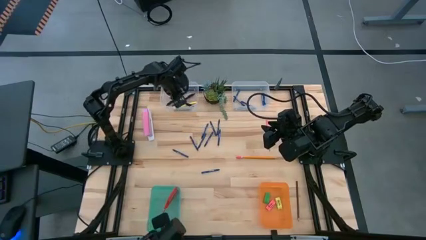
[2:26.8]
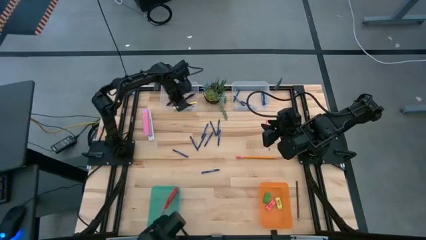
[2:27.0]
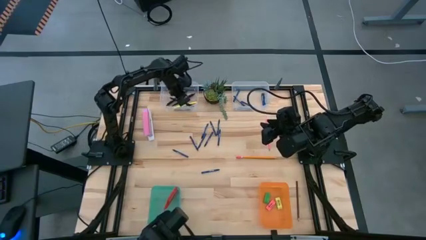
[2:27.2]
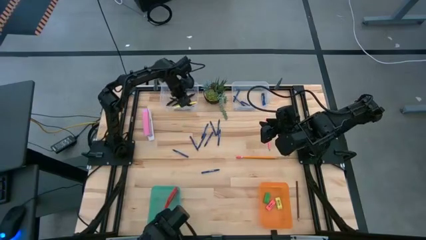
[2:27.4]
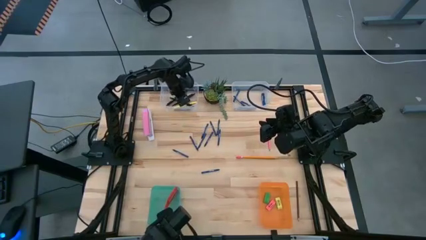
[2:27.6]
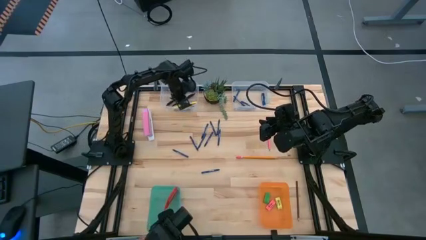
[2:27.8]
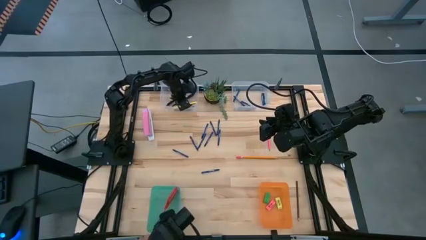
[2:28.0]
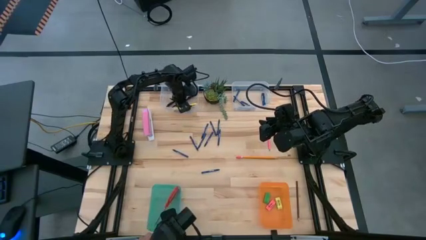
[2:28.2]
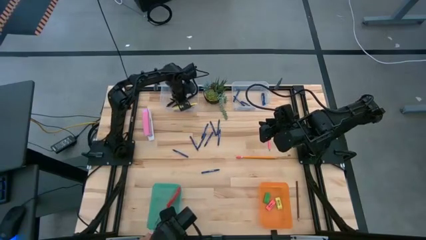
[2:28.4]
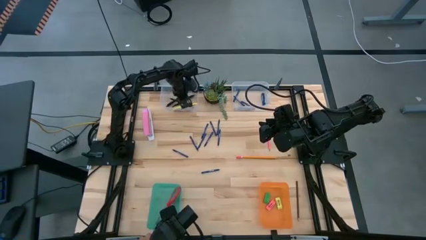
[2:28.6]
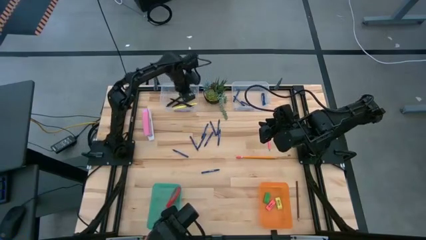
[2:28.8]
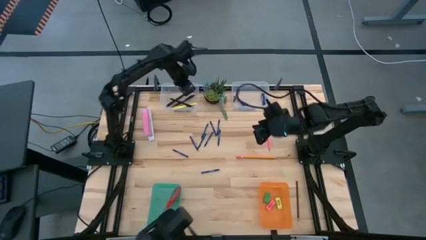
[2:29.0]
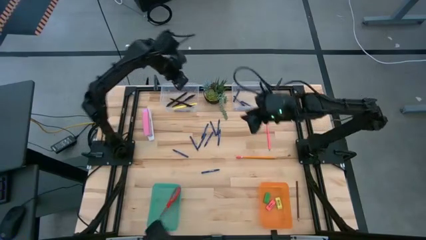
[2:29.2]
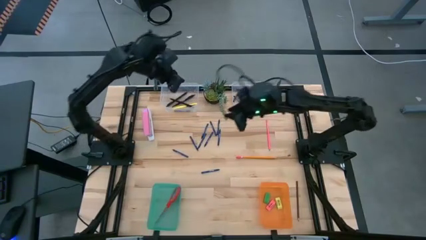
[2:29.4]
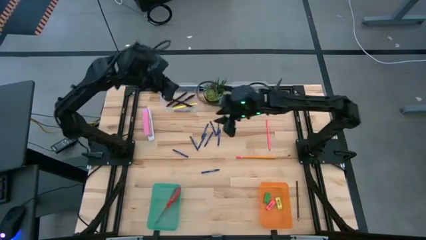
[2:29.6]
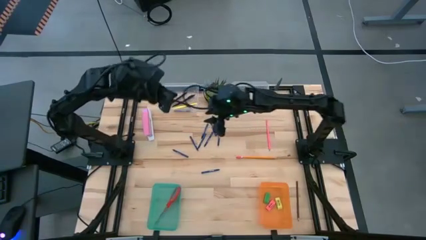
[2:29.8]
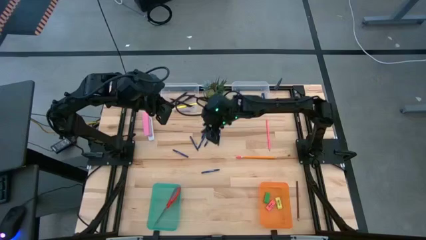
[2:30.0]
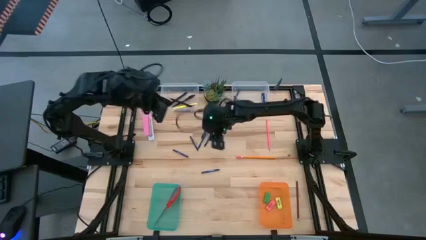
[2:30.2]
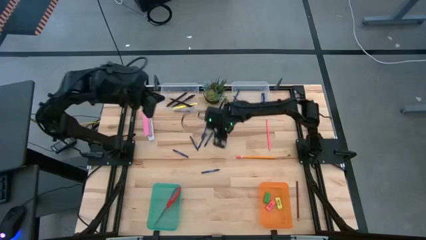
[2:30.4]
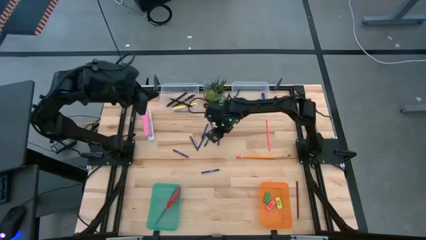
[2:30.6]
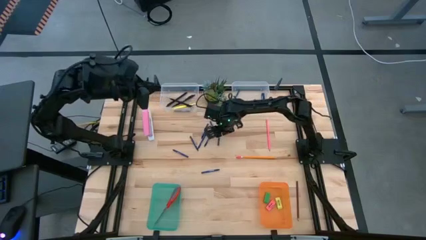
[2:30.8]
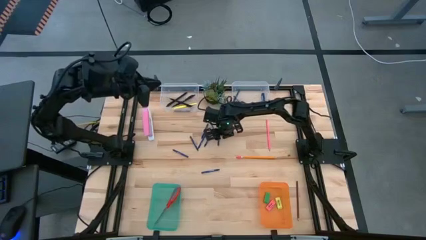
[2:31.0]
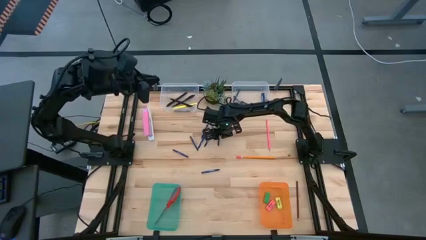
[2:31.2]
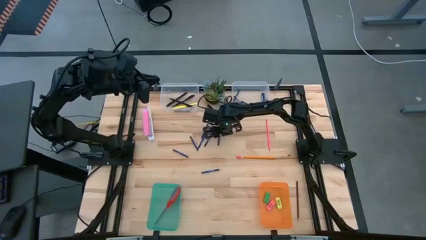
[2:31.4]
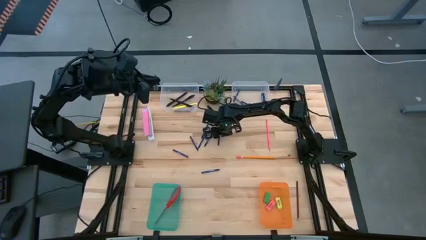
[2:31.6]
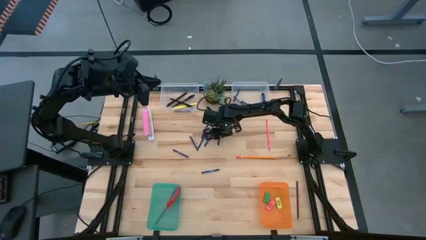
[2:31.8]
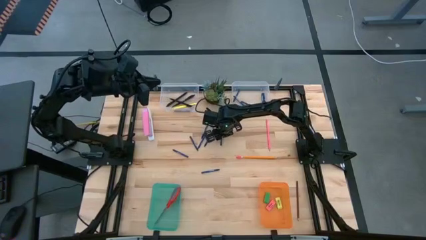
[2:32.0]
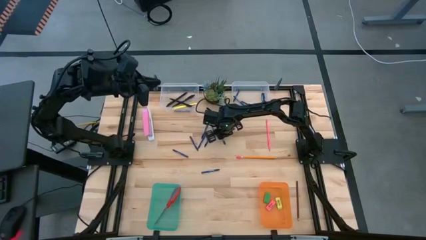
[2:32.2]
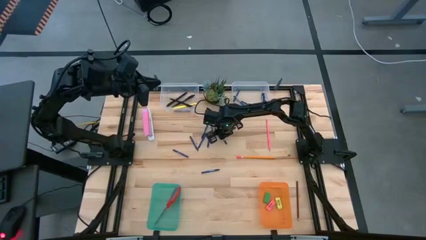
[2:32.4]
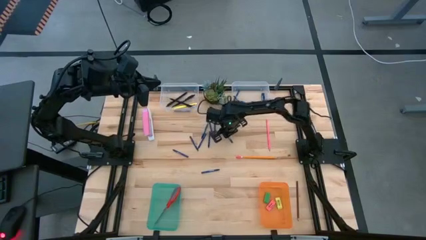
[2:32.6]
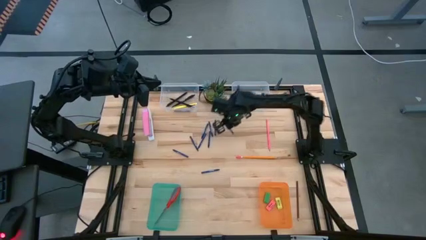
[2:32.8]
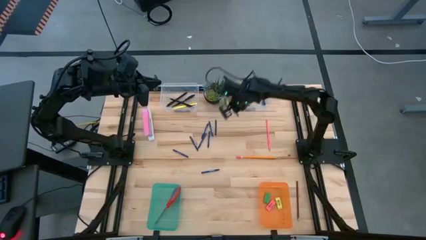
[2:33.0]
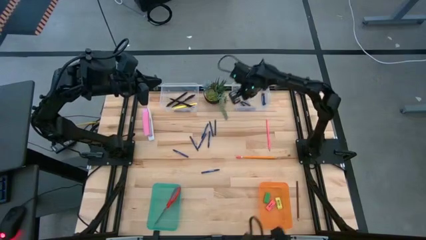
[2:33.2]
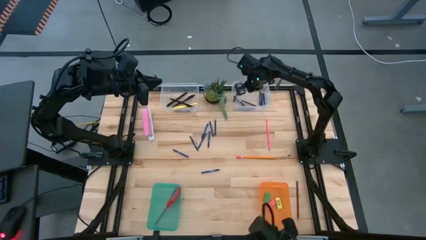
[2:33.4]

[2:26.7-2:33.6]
Task: Sort crayons/erasers/pens/pencils in bins
Put the blue crayon into the right transparent bin

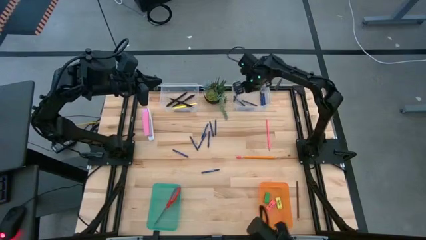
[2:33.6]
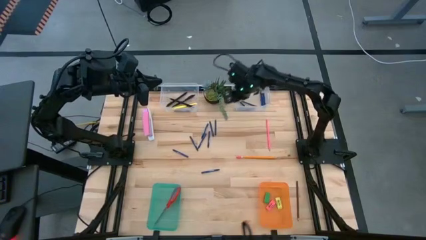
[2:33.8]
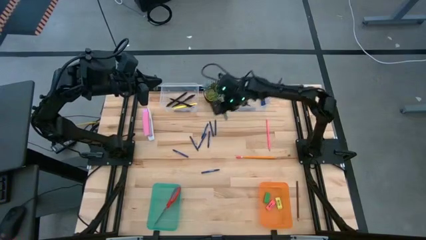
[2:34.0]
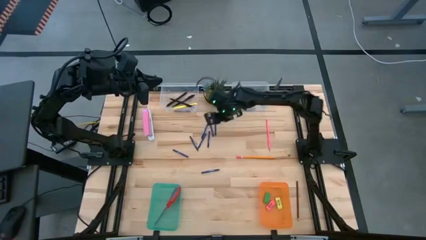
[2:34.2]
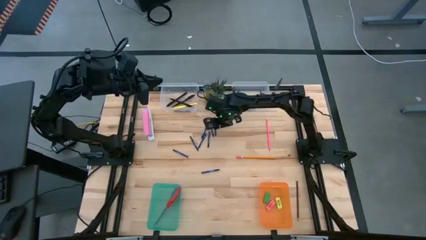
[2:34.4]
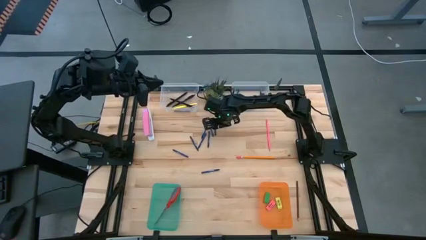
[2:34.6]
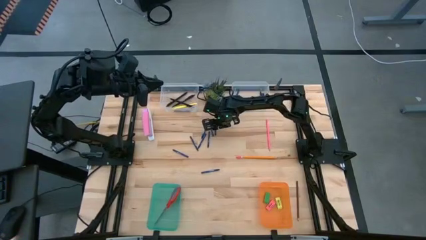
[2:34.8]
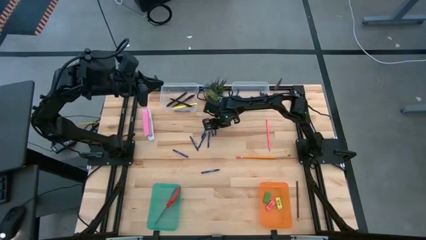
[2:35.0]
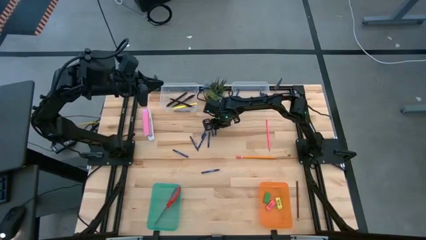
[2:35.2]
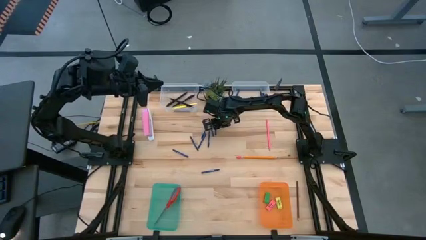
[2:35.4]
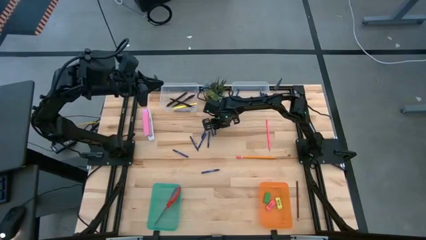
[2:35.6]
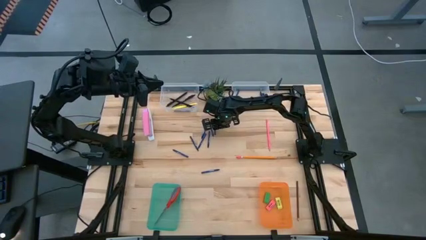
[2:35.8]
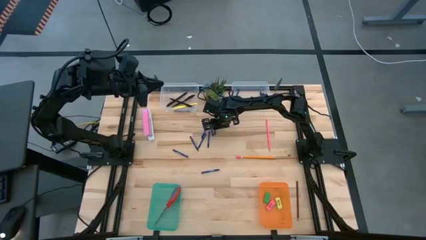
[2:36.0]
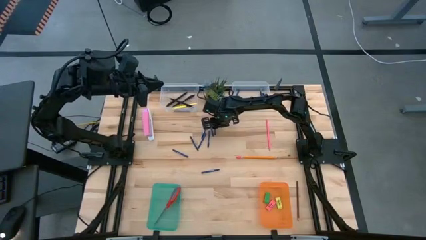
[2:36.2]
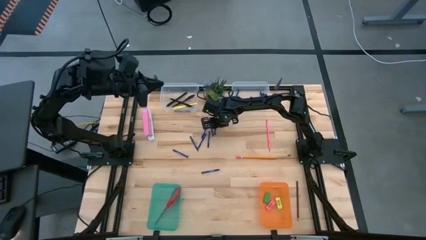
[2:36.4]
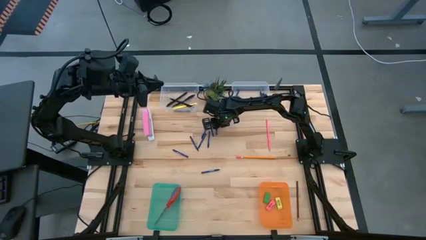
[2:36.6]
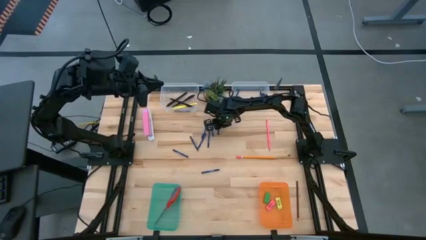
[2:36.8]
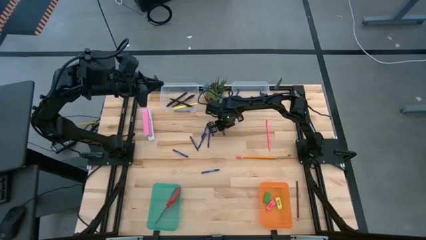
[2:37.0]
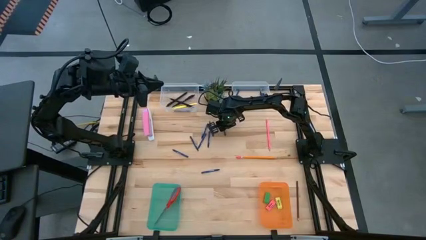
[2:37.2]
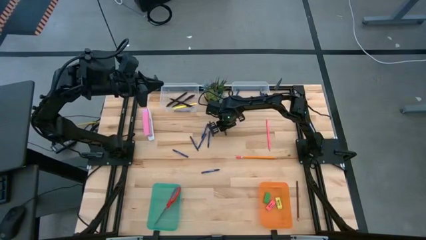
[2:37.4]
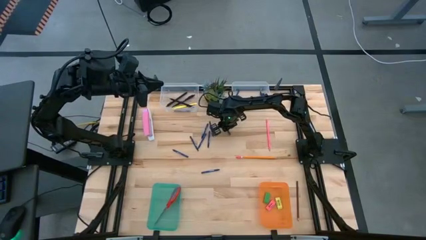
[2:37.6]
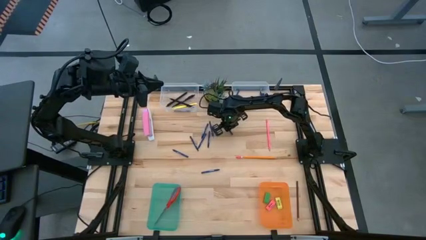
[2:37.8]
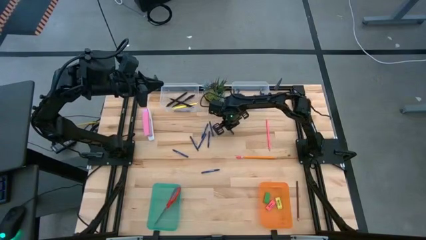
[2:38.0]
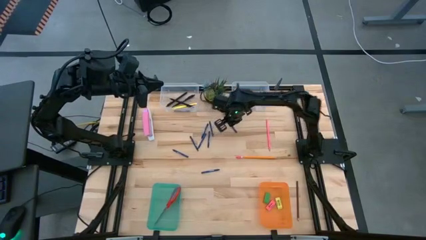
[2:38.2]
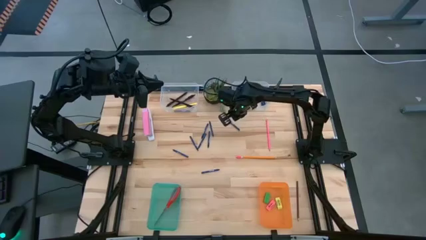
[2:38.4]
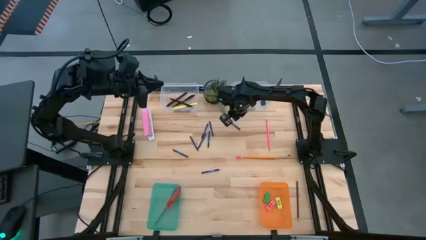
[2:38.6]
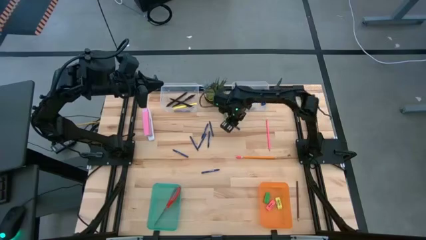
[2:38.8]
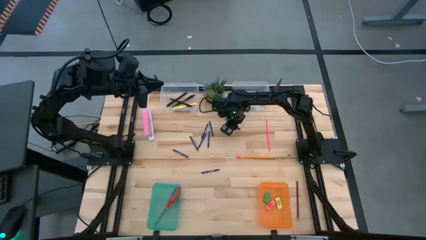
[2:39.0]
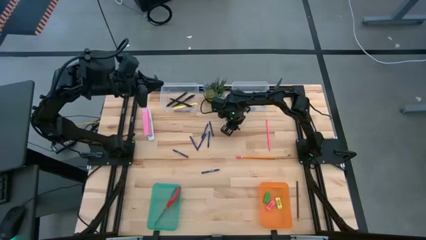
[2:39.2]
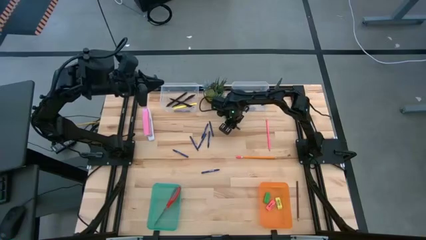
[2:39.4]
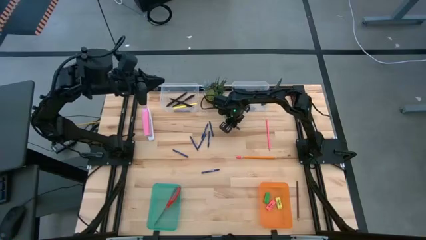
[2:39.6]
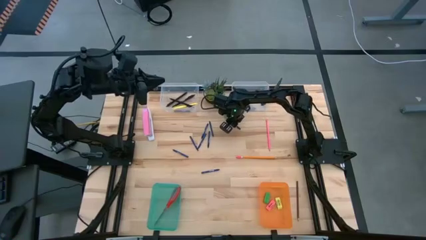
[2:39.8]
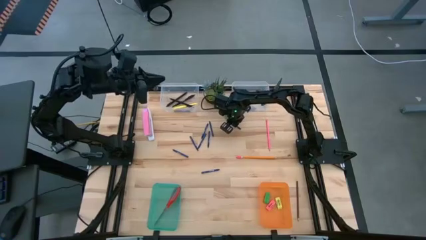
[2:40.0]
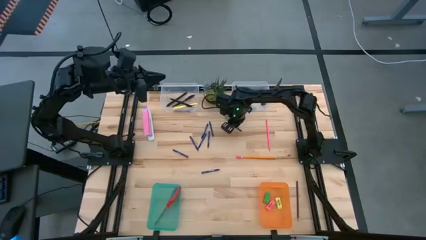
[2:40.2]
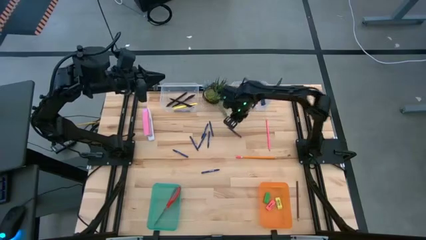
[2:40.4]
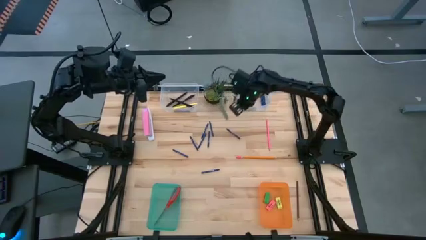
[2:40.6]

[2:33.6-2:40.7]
Put the blue crayon into the right transparent bin

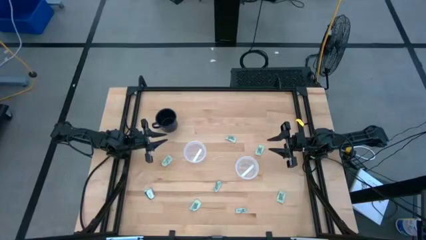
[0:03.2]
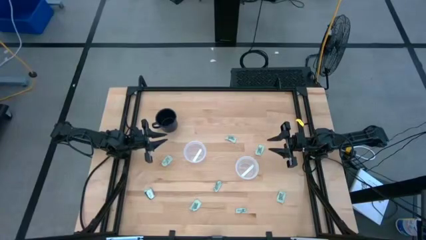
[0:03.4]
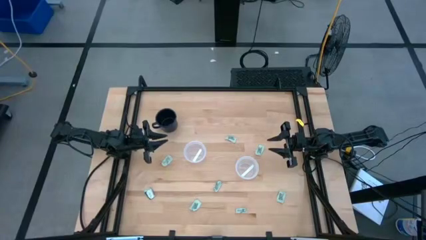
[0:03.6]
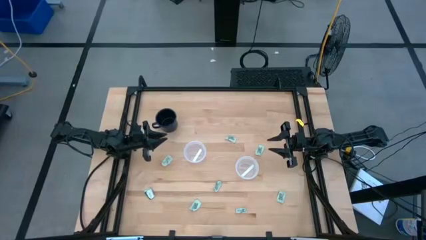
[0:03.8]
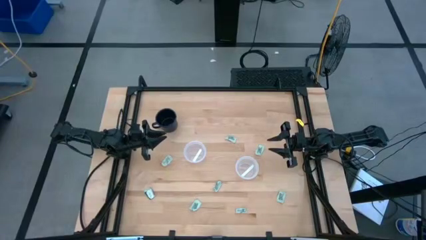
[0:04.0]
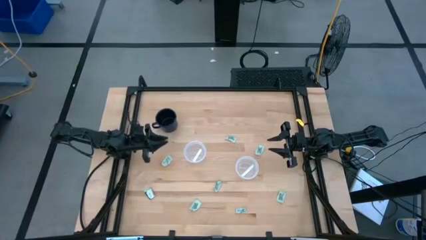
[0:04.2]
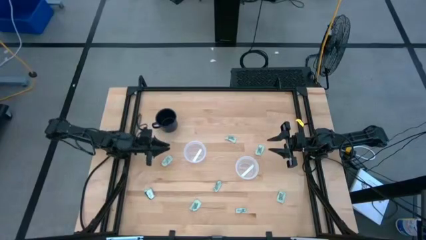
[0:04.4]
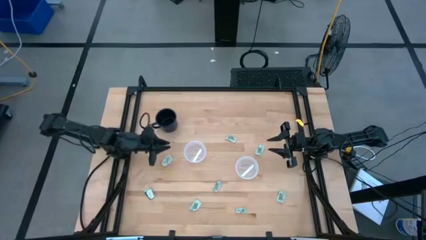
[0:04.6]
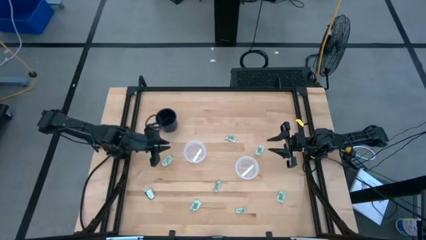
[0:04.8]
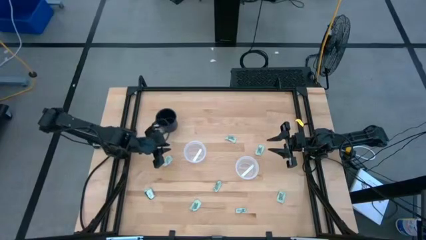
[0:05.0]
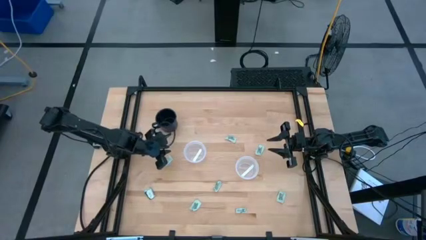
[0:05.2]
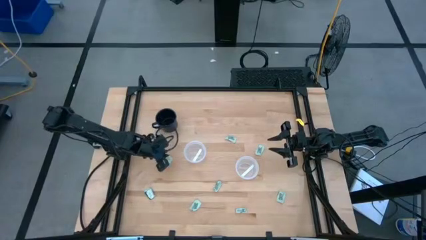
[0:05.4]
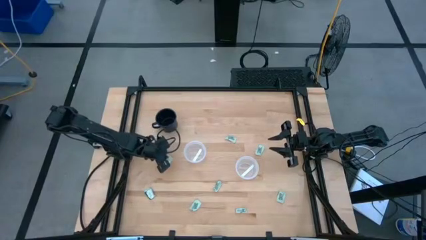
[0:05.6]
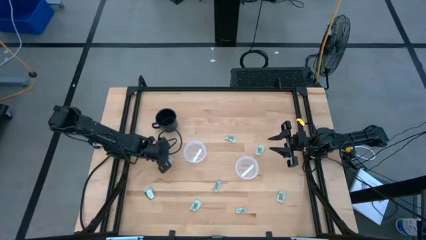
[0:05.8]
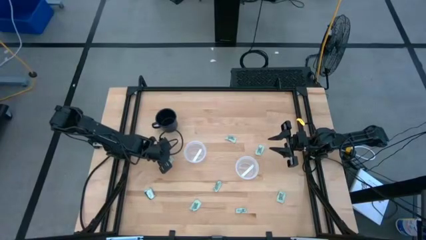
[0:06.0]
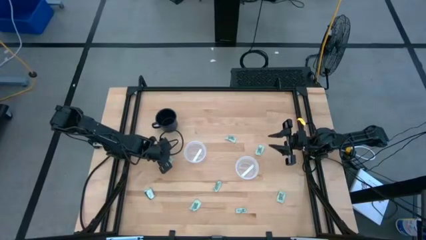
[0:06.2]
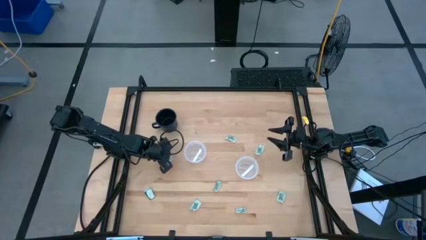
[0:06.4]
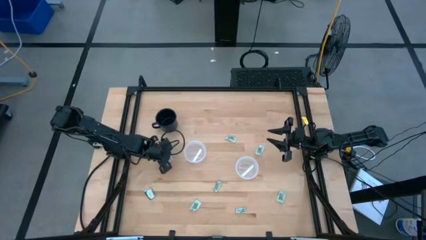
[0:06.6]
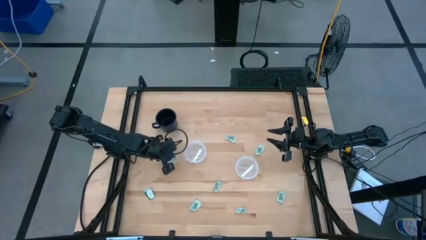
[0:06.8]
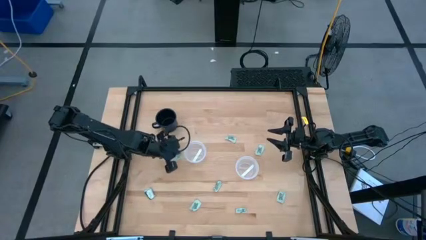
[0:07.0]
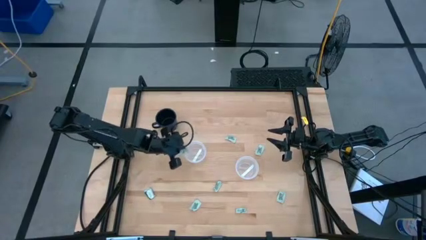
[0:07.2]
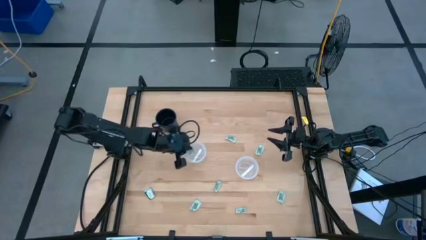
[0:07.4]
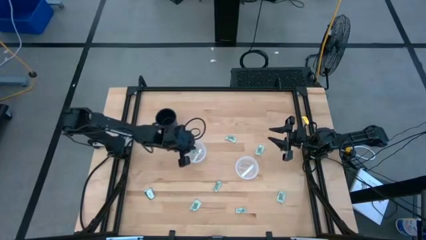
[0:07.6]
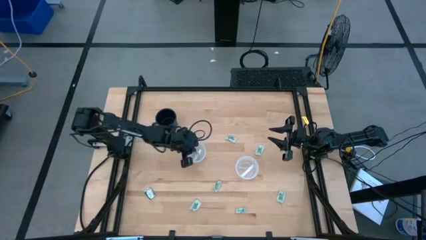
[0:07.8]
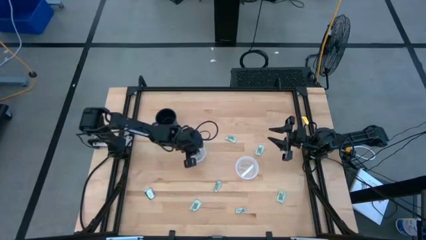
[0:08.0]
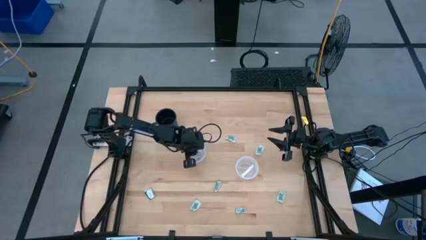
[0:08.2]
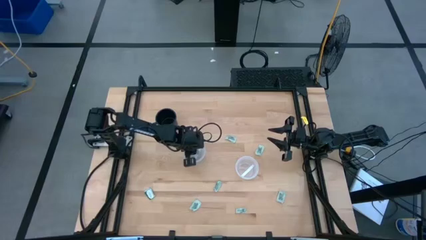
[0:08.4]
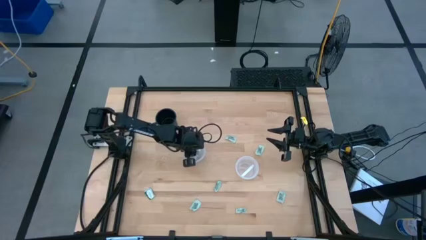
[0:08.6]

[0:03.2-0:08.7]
Task: Pick and place Stevia / Truvia into bins
Put the green stevia packet into the left transparent container
